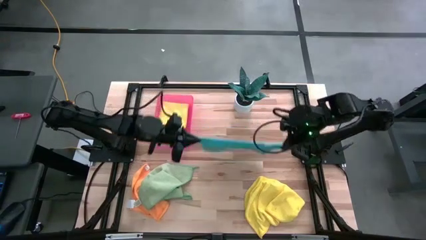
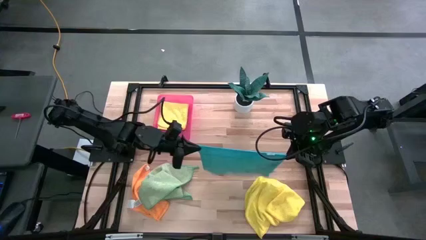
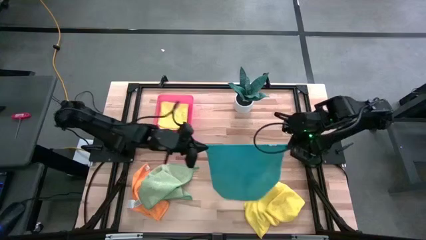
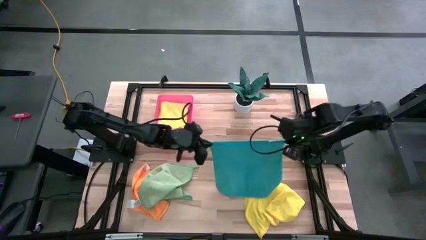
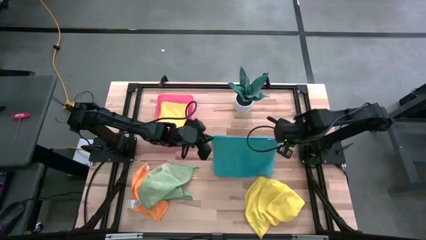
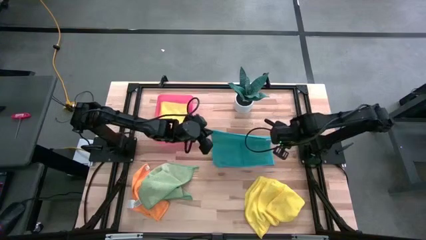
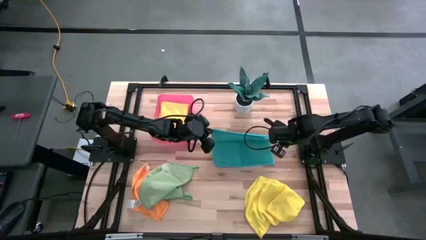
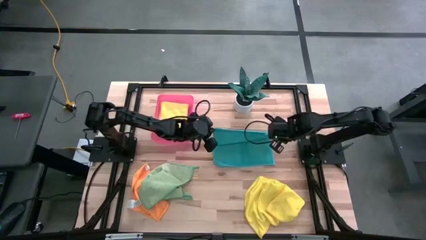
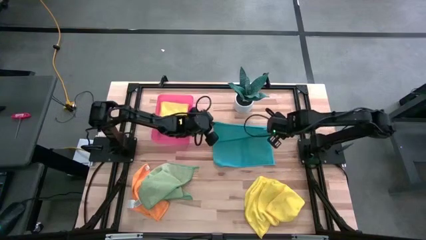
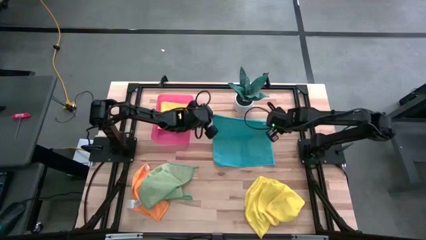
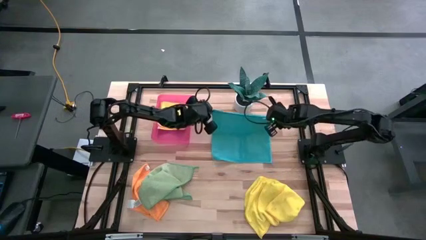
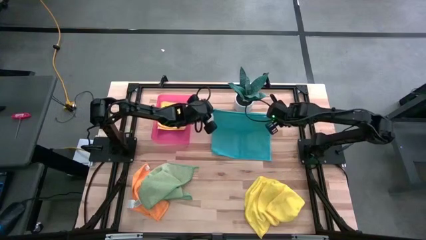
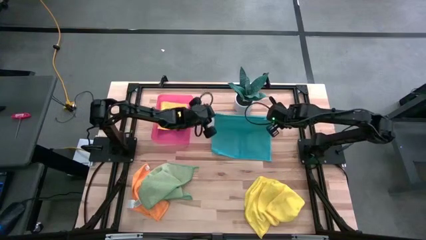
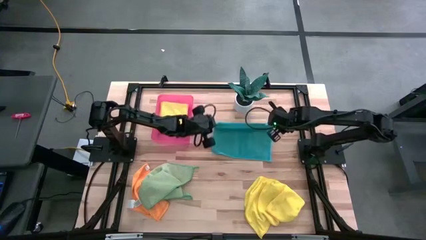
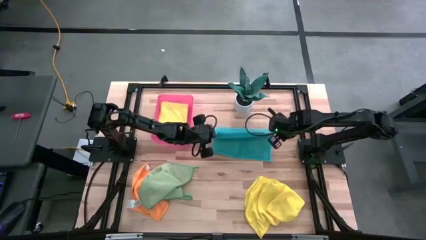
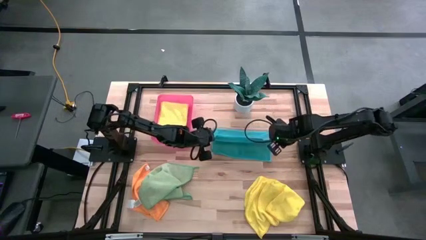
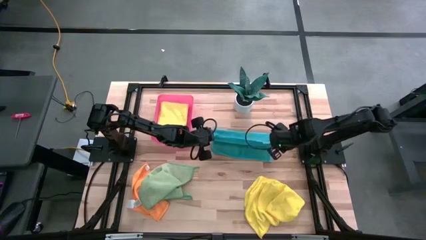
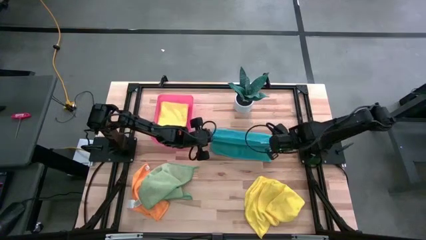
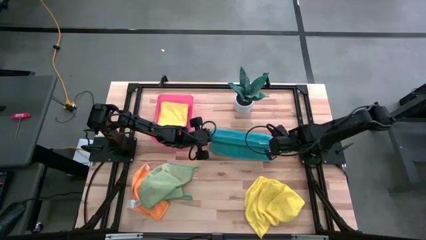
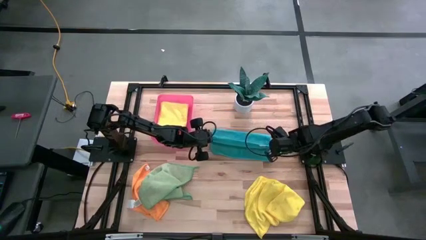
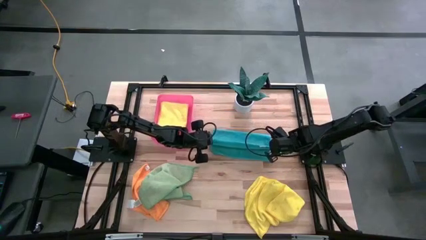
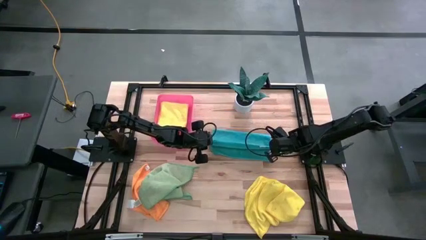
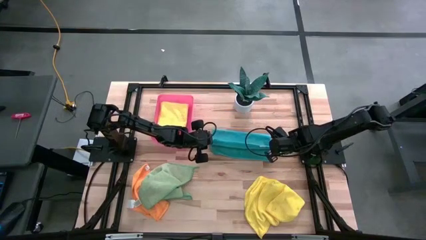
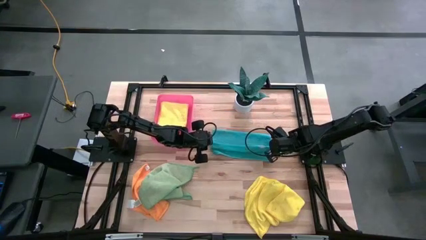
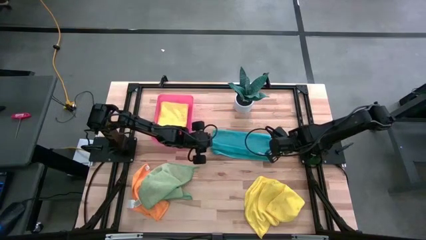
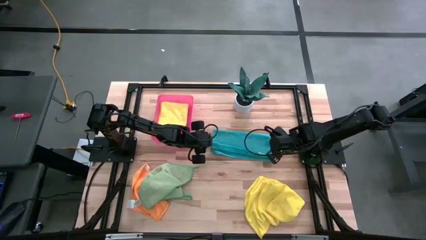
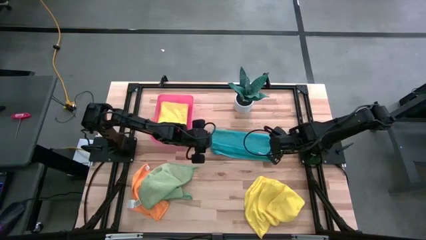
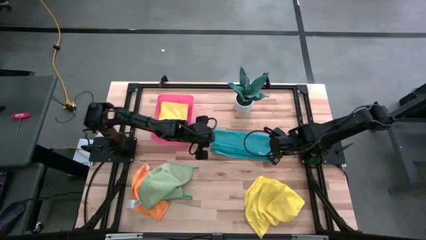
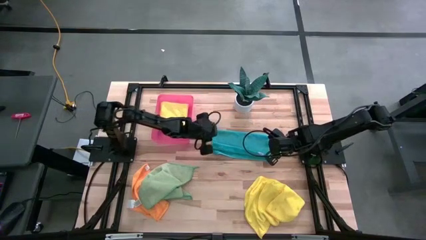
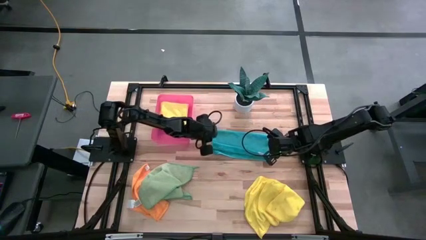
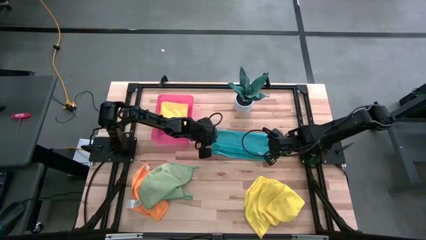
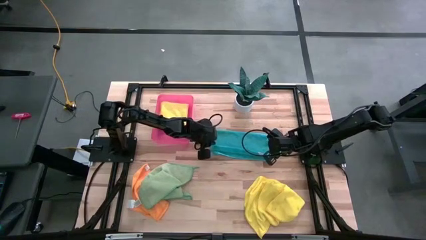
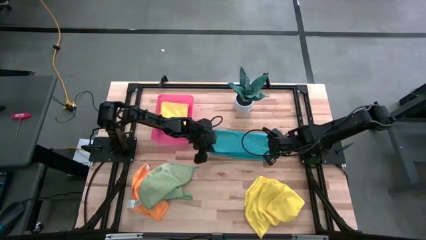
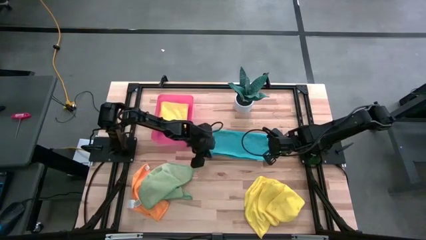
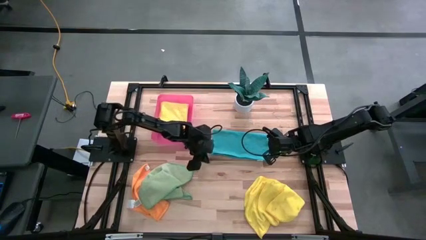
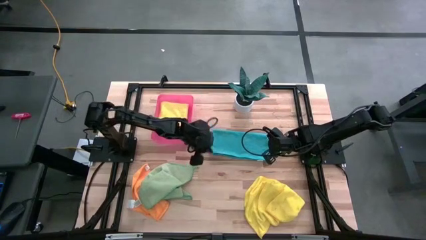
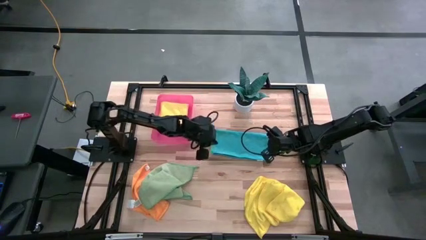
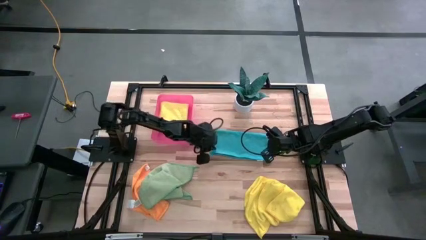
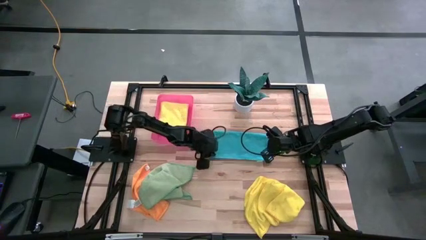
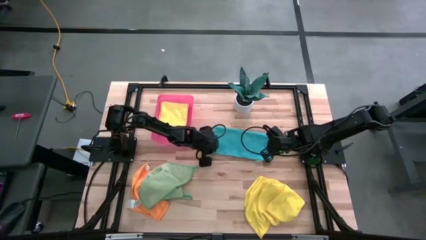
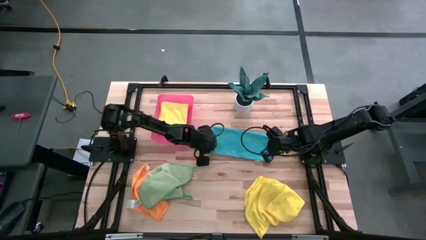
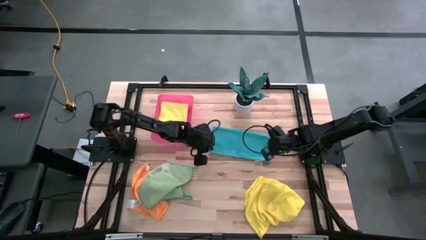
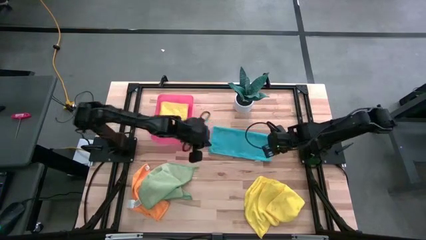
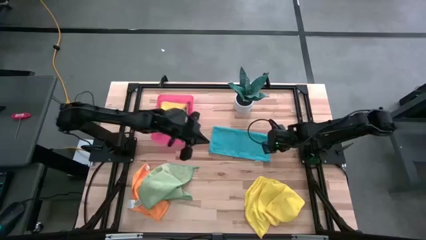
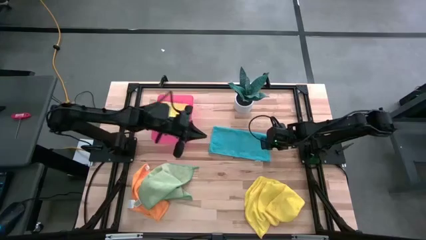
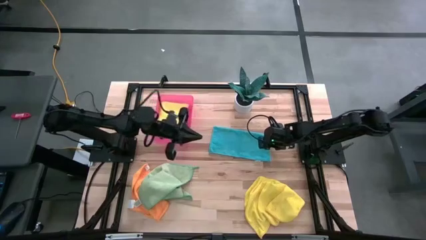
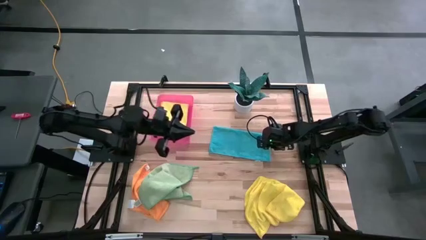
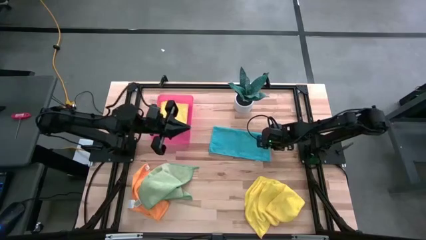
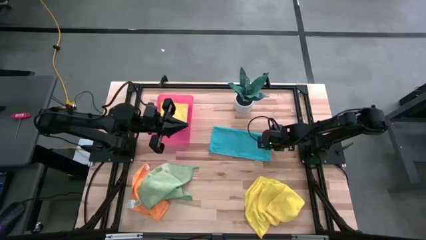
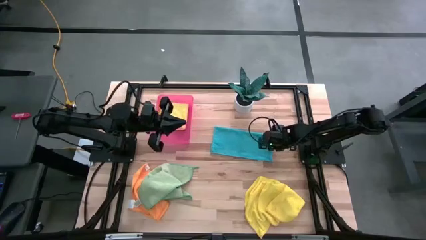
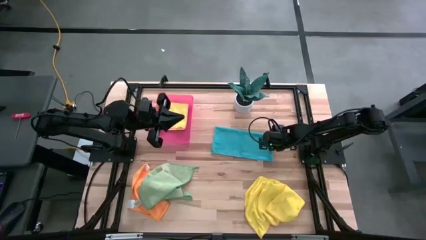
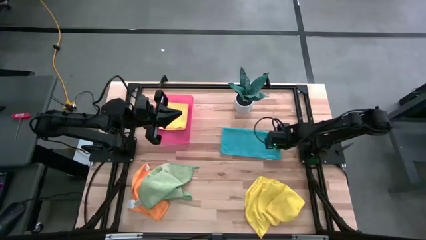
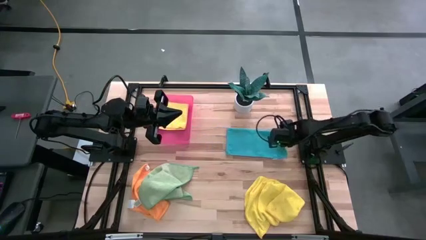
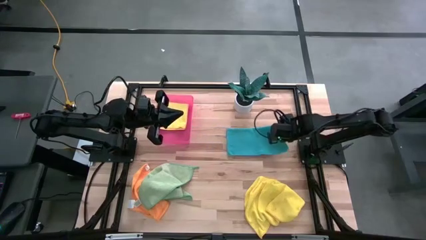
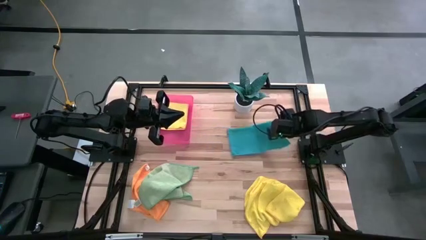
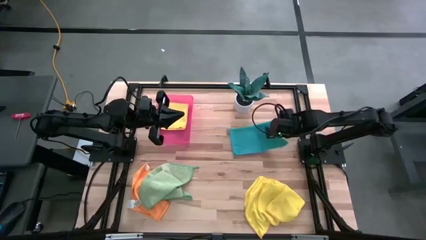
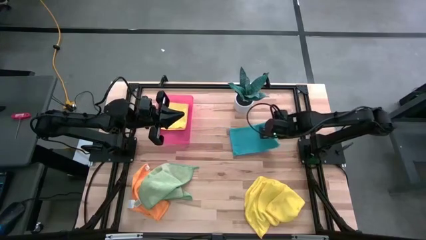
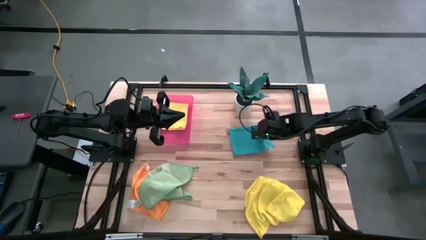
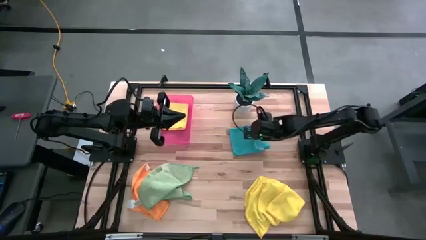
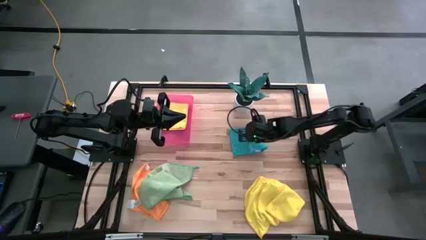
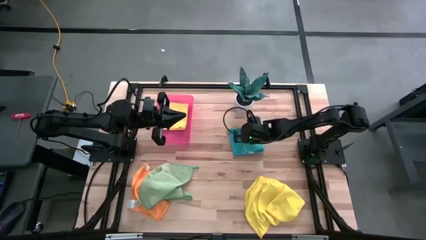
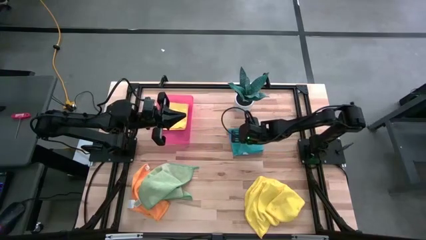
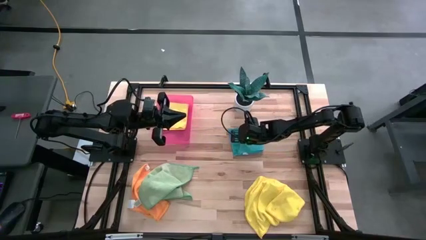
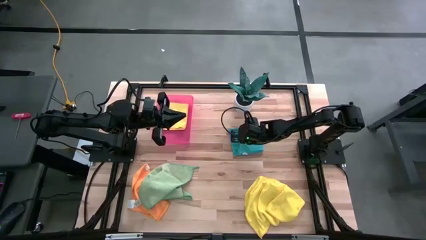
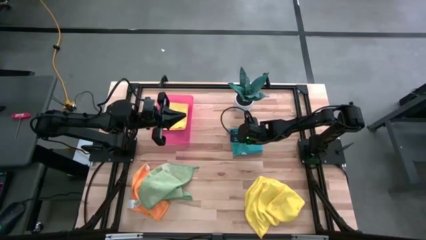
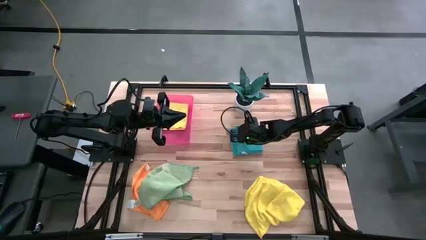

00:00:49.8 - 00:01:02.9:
Task: Fold microfiber towels
Fold the blue microfiber towel

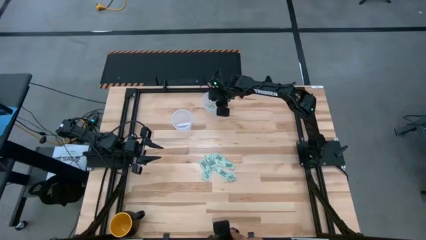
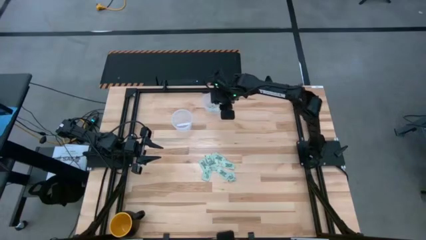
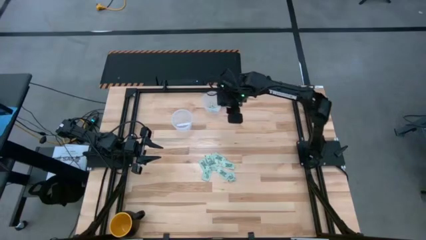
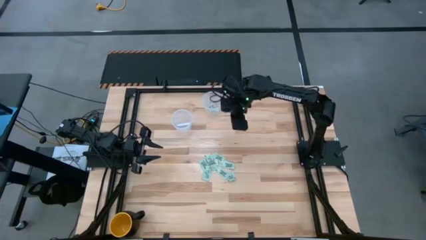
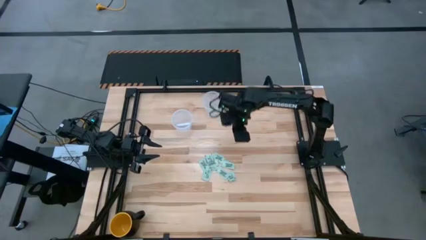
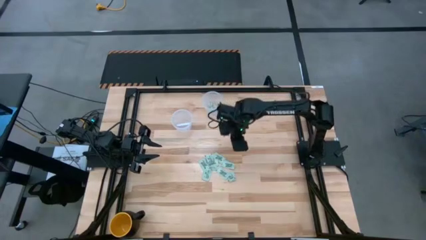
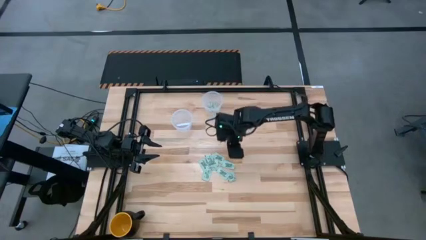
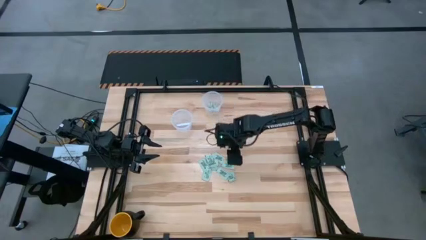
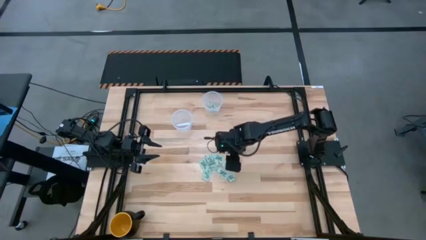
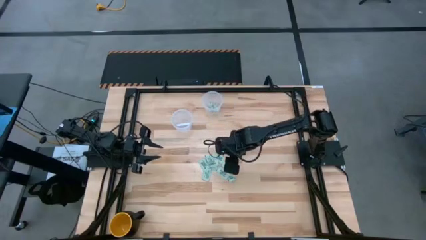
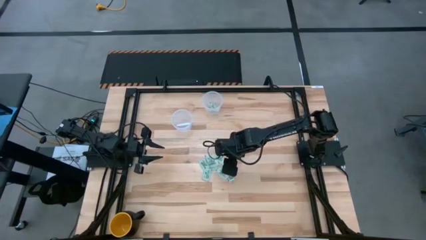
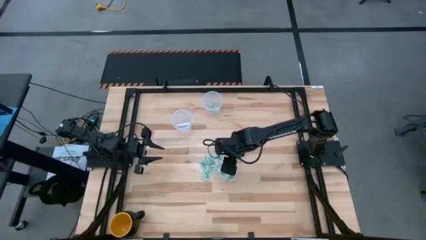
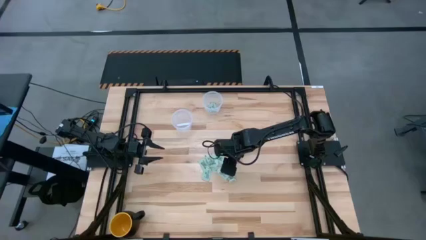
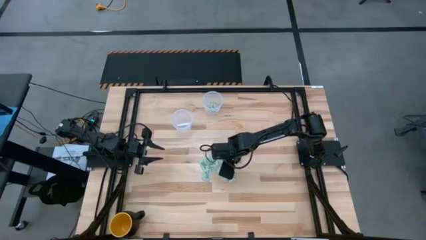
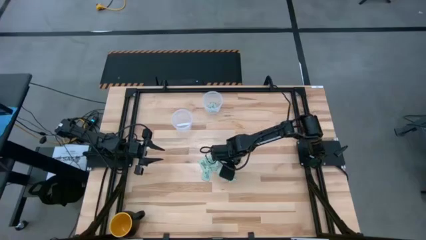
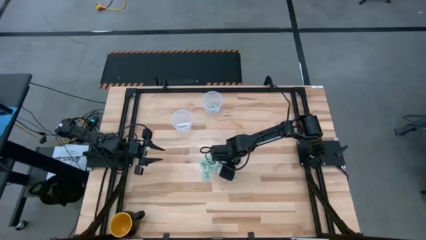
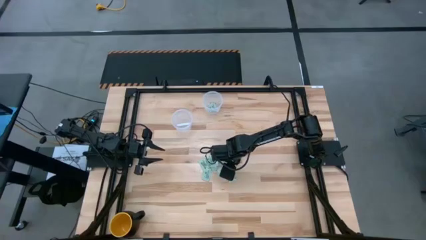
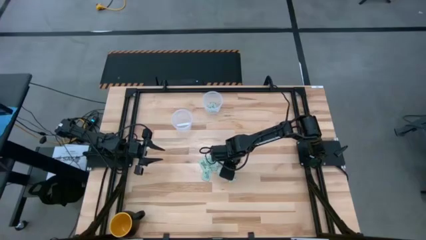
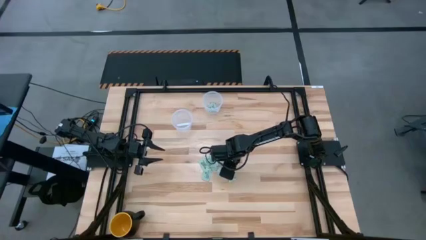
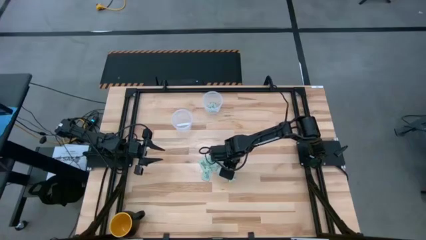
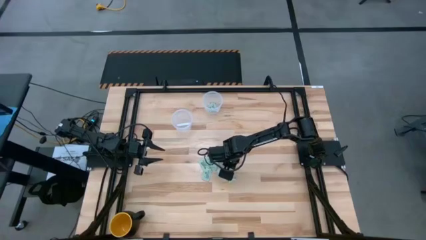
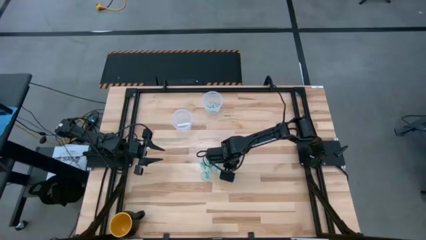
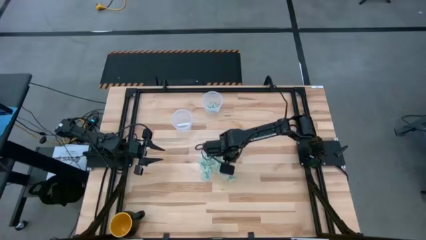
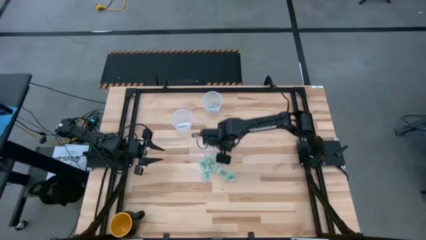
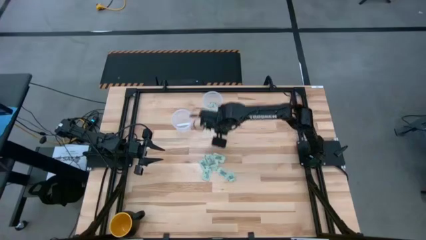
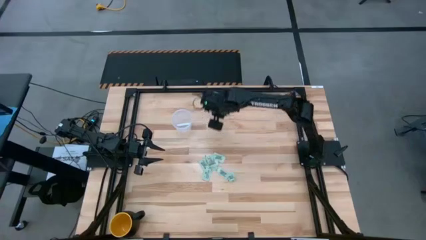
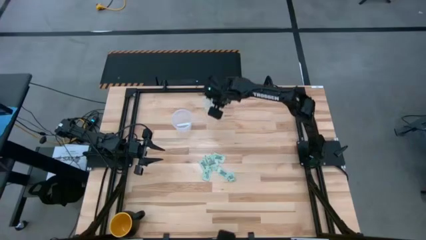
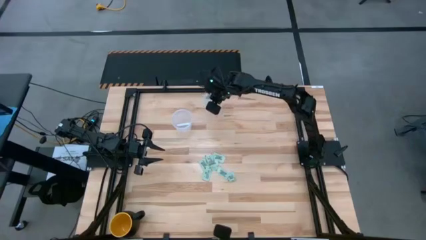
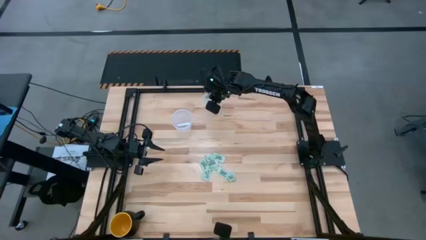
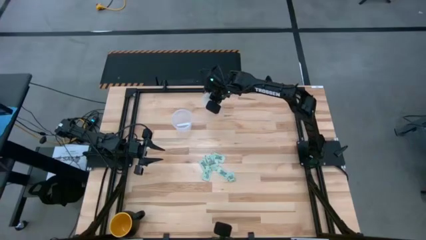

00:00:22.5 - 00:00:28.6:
Task: Pick and place items into bin
Put the stevia packet into the top transparent bin
